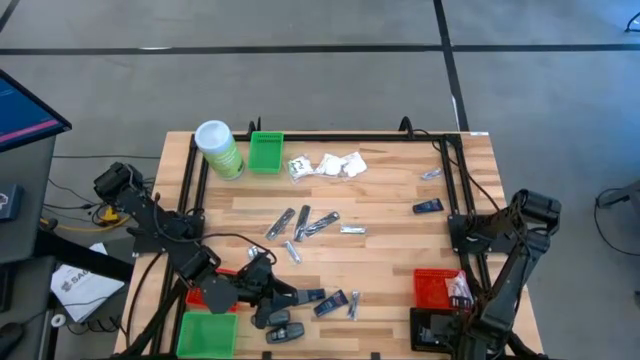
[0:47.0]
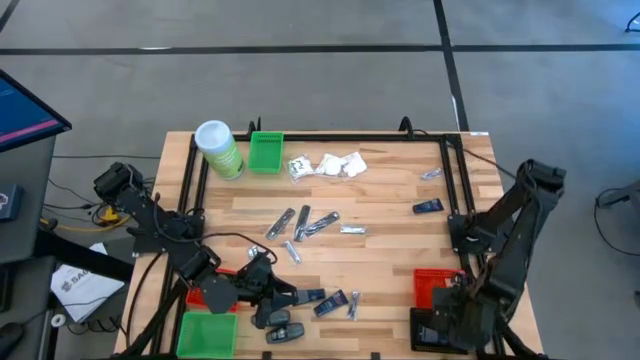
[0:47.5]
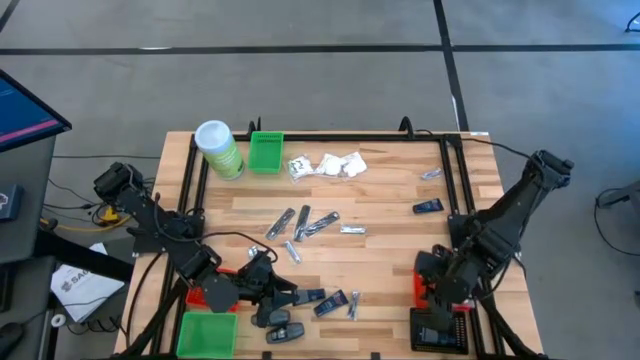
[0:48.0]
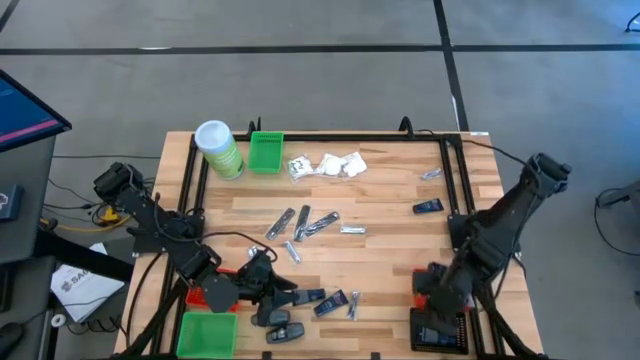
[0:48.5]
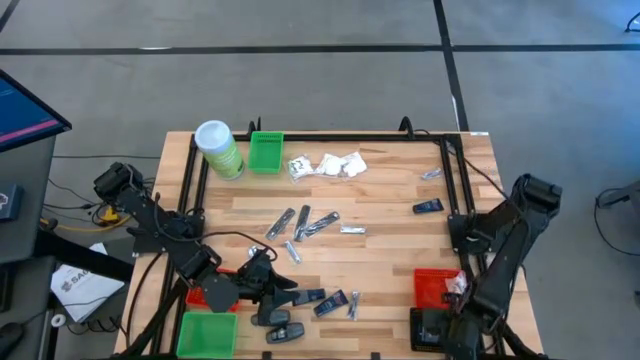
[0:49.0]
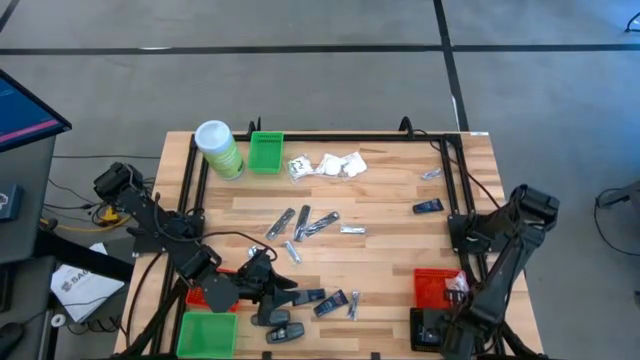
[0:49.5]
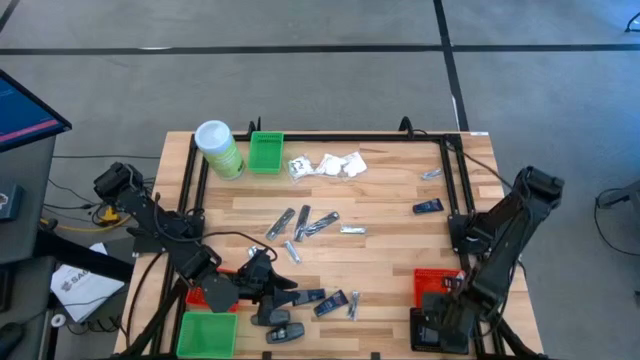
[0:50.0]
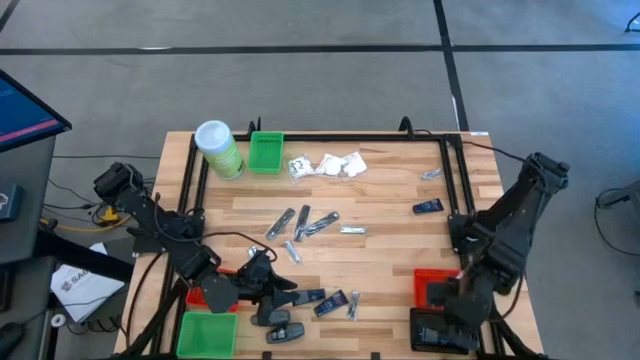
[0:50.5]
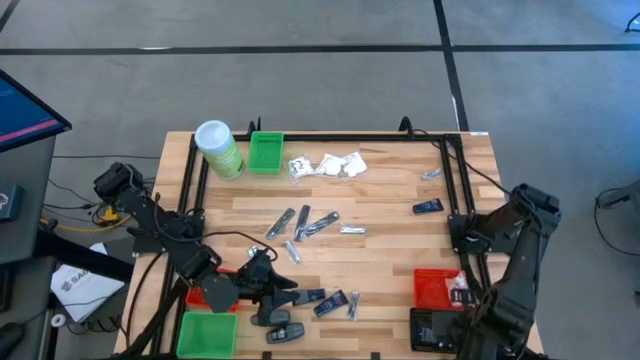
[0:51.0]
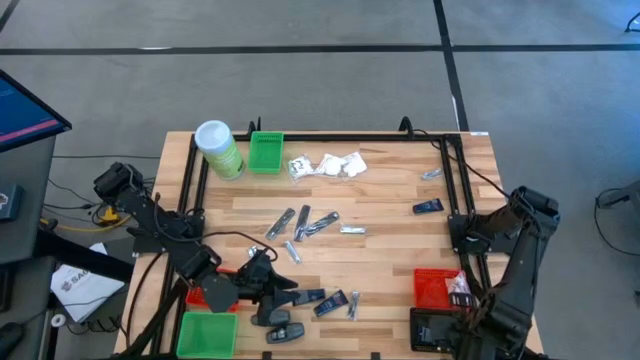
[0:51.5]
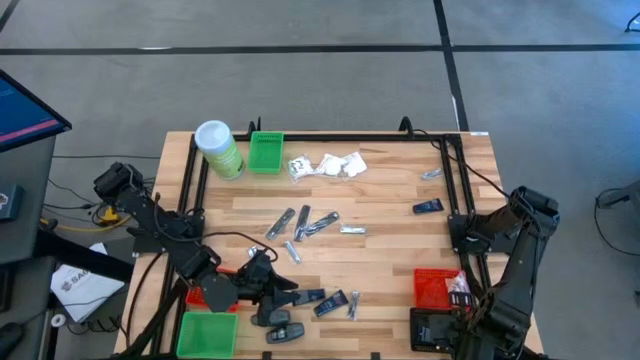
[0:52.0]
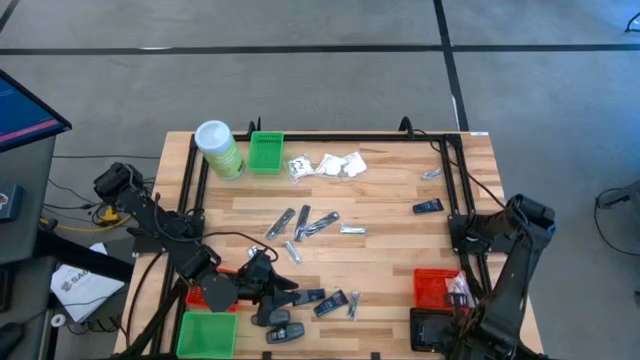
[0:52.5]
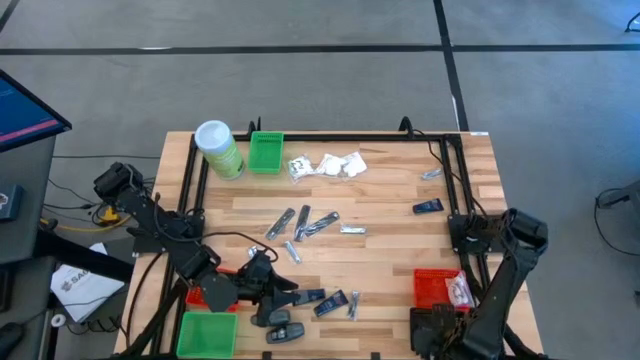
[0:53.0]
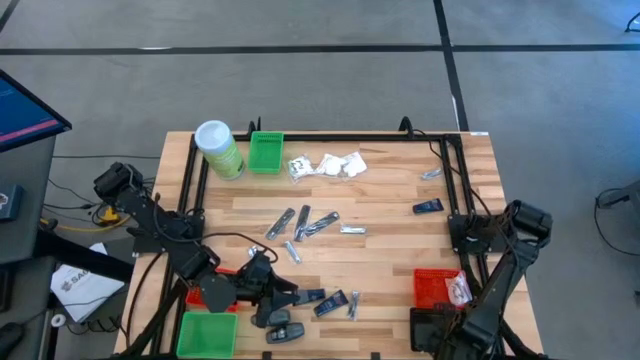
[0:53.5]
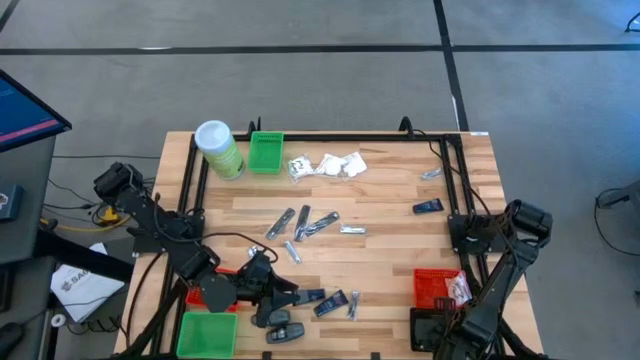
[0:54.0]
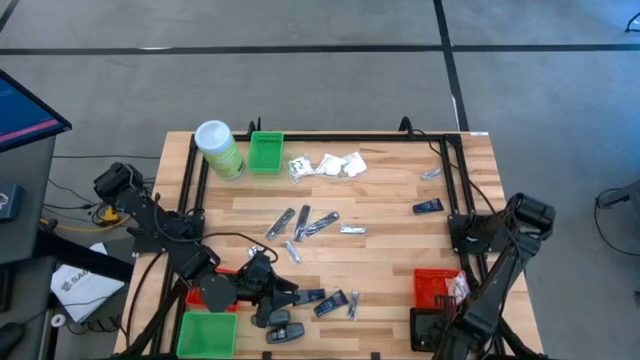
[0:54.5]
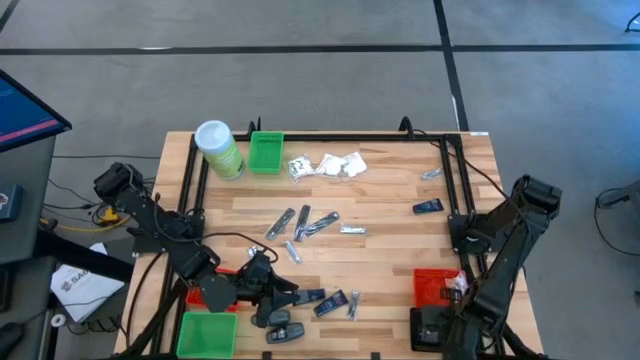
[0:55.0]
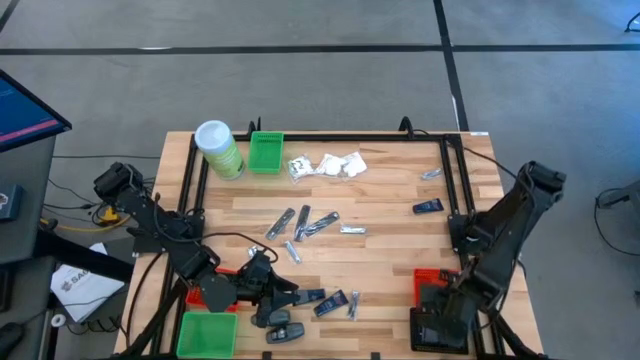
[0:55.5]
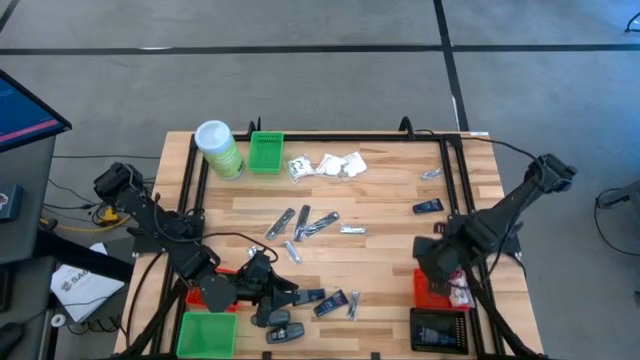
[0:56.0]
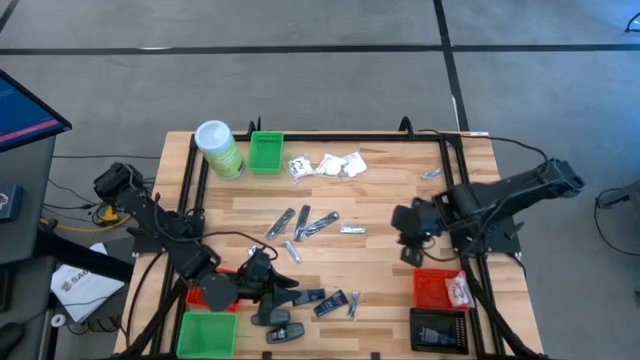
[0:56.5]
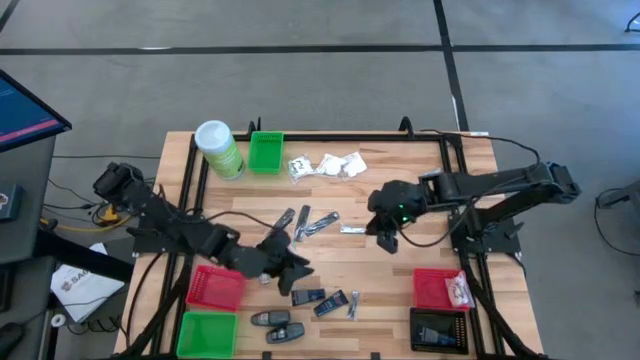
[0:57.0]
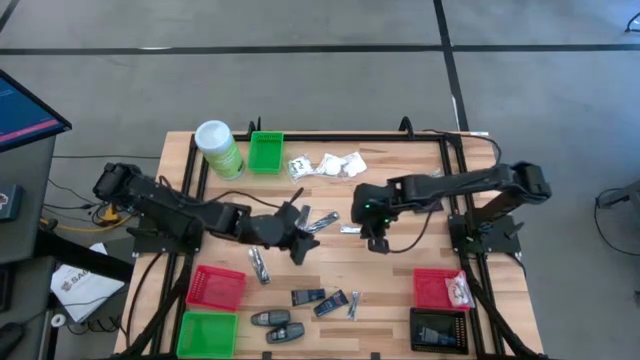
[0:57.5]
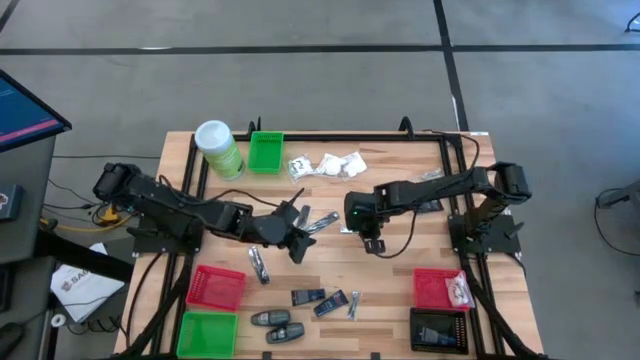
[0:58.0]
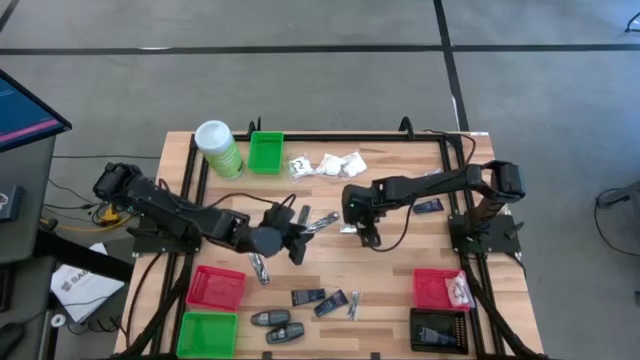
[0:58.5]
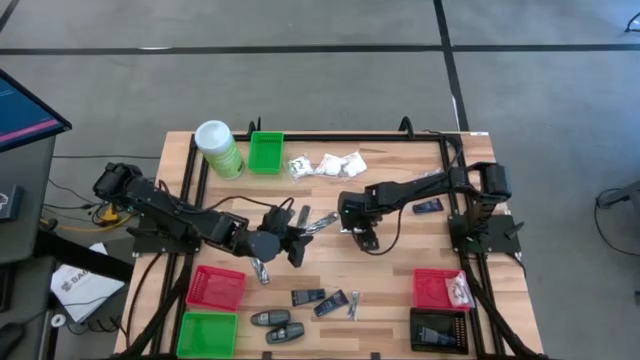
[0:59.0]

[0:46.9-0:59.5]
Task: Pick & Place Travel size toiletries
Put the nail cutter into the left red bin

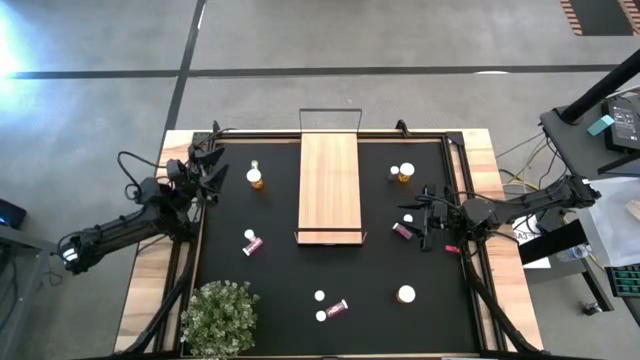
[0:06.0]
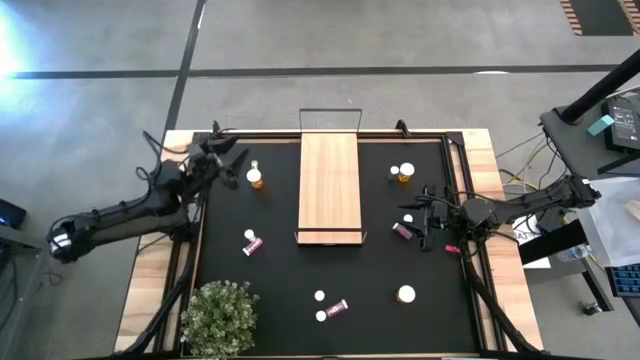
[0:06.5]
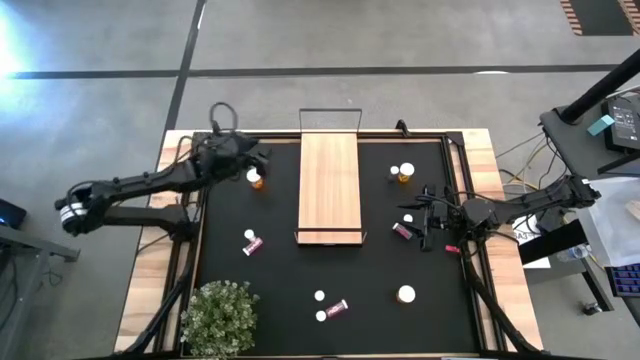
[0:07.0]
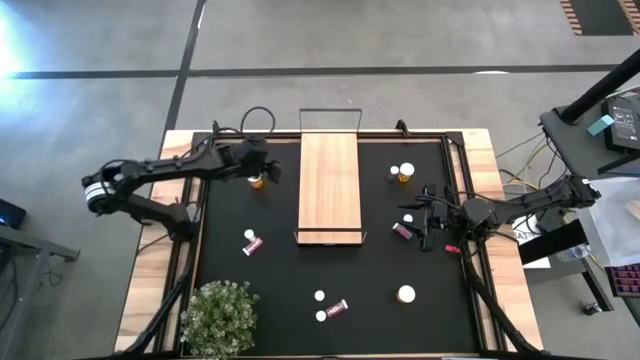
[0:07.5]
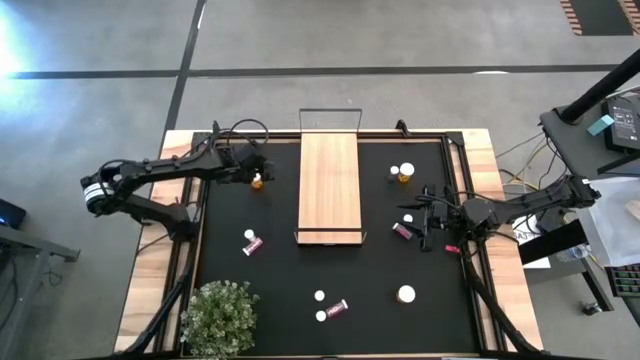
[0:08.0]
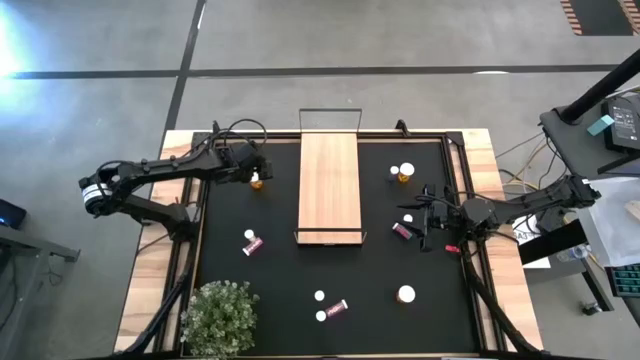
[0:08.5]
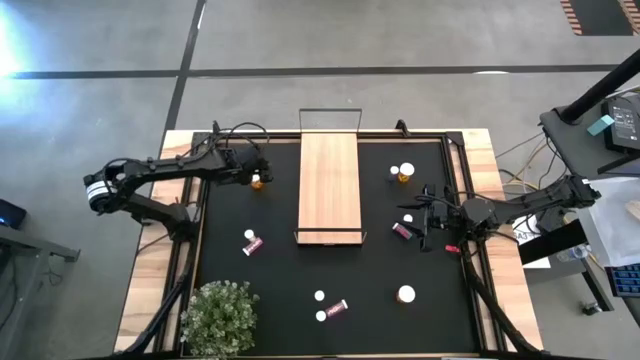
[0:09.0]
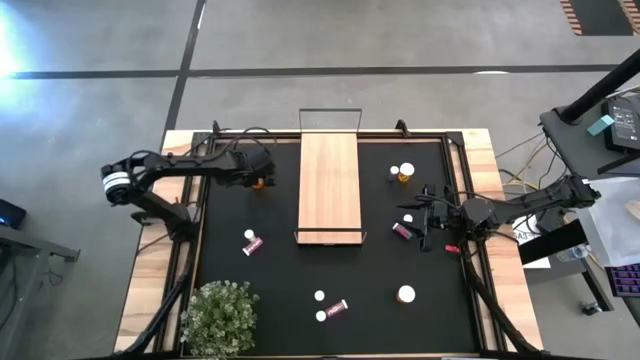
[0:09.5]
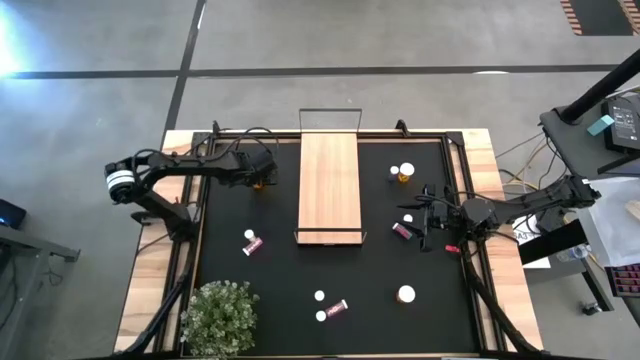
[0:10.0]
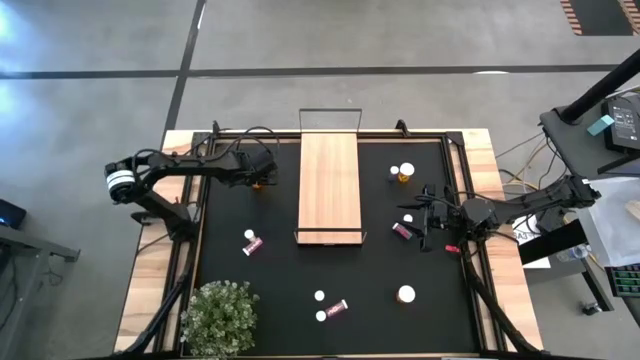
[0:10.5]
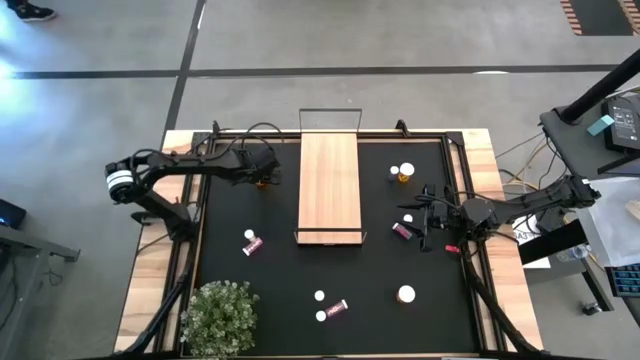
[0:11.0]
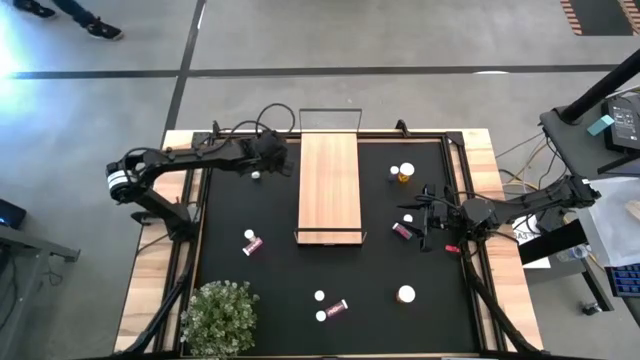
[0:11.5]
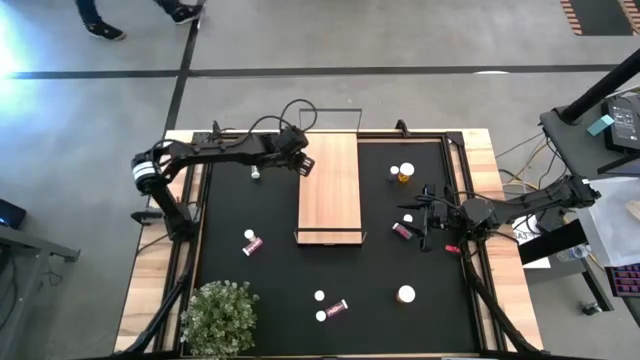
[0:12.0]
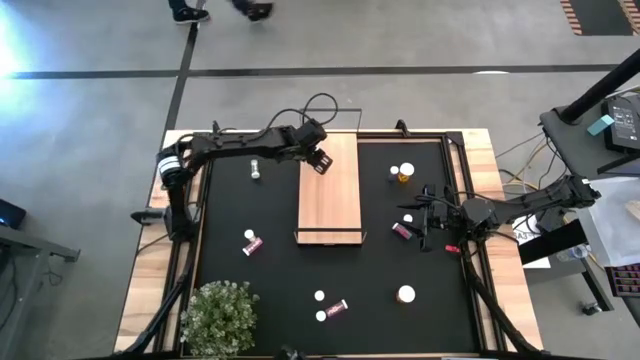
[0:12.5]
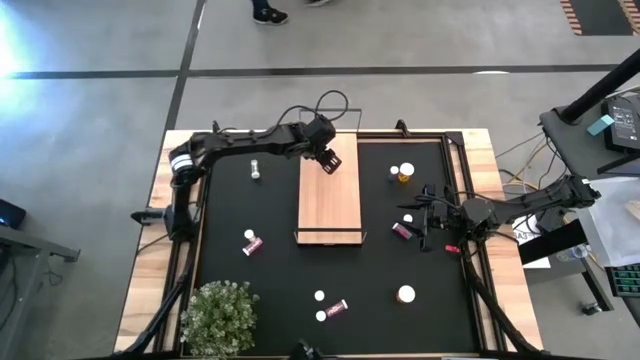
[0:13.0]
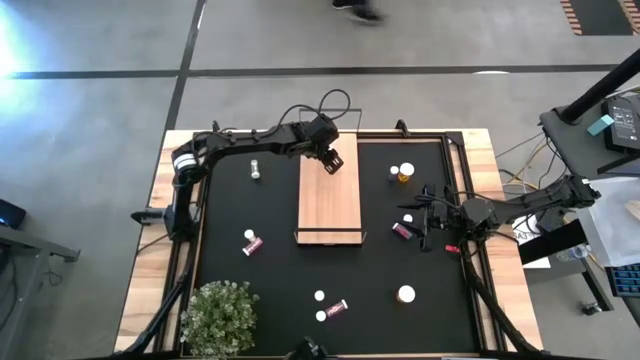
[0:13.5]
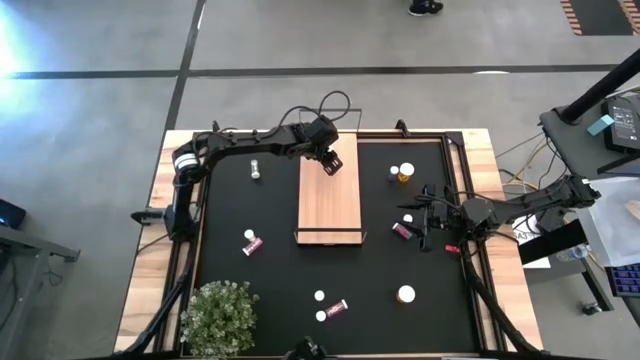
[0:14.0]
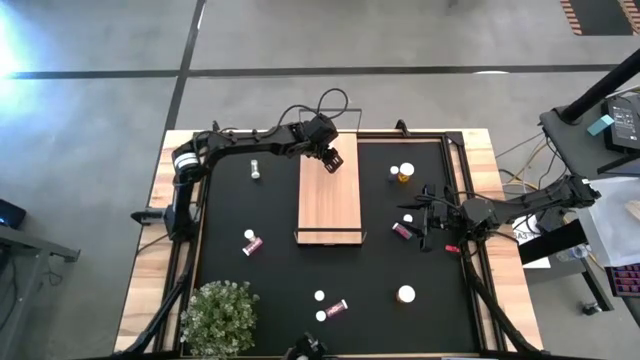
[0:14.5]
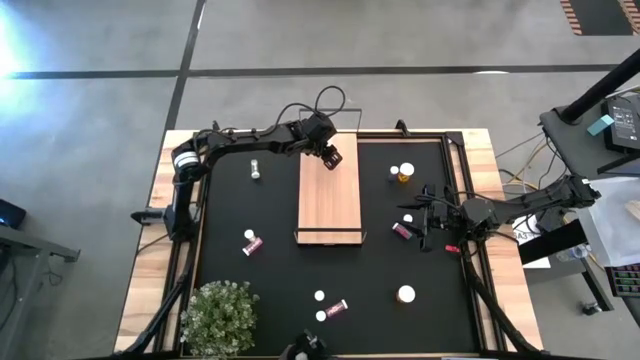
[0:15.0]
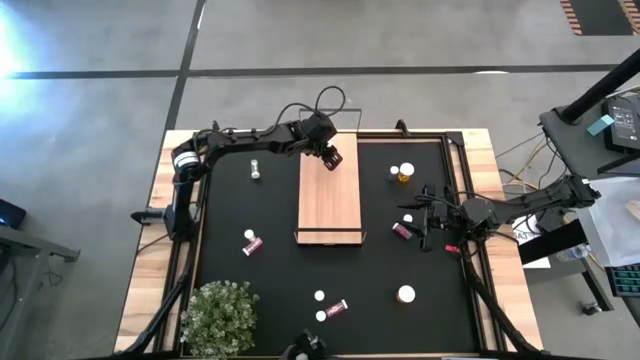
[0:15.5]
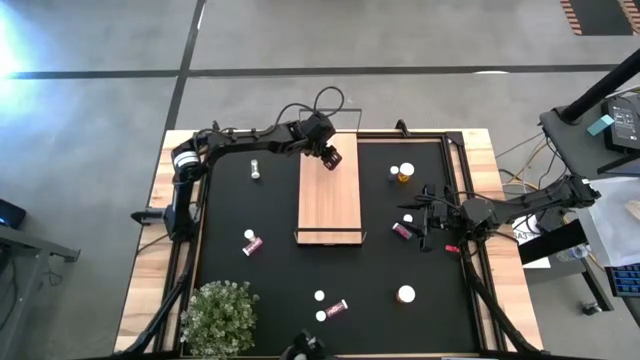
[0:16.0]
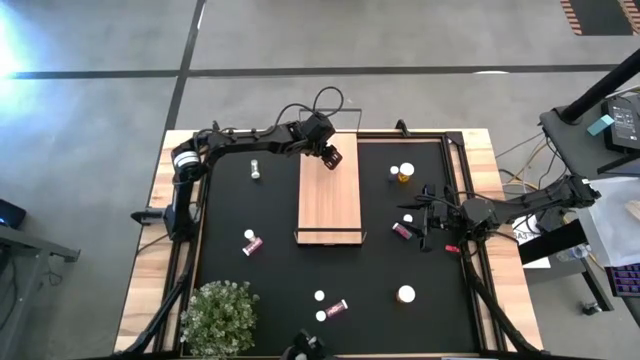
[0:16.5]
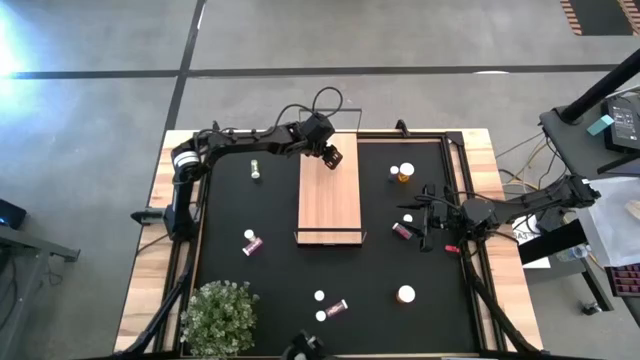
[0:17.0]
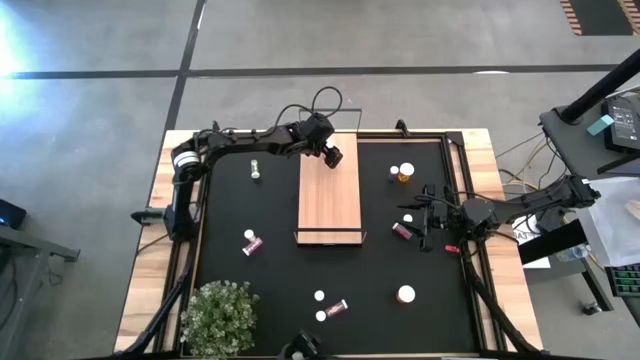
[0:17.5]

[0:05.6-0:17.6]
Task: Pick and place medicine bottles onto shelf by color
Put the top left orange medicine bottle on the shelf
